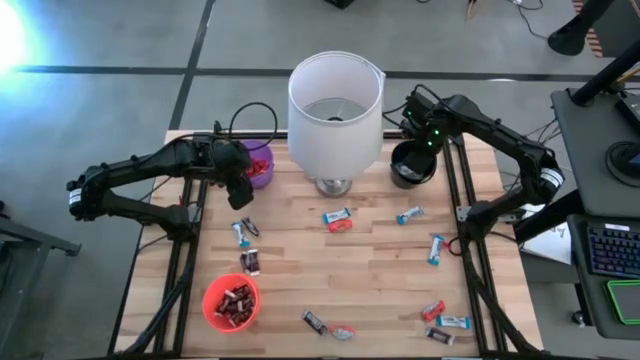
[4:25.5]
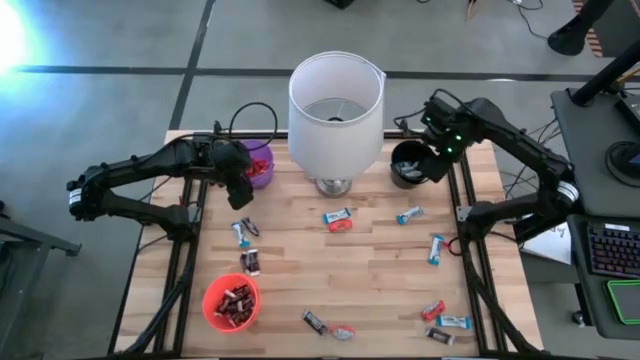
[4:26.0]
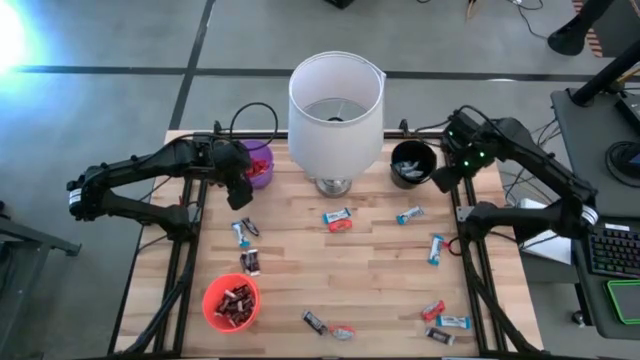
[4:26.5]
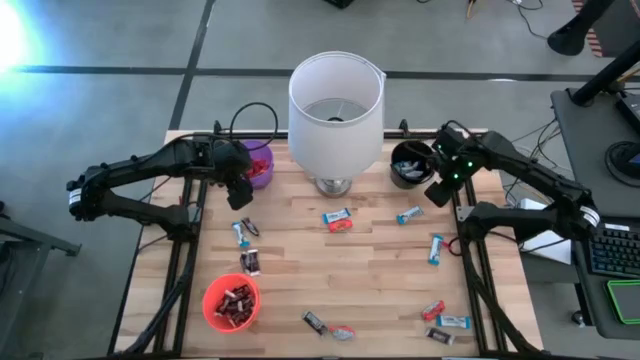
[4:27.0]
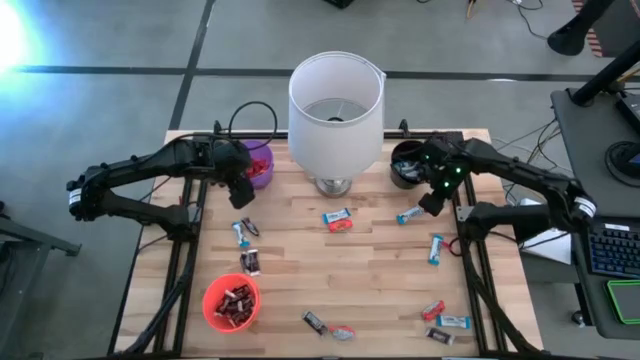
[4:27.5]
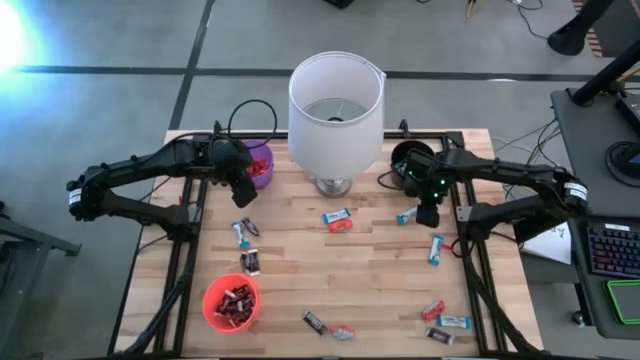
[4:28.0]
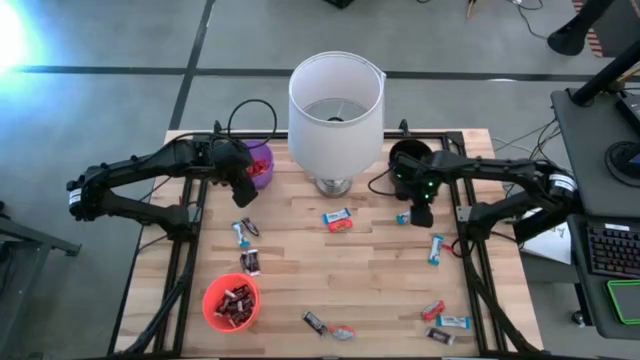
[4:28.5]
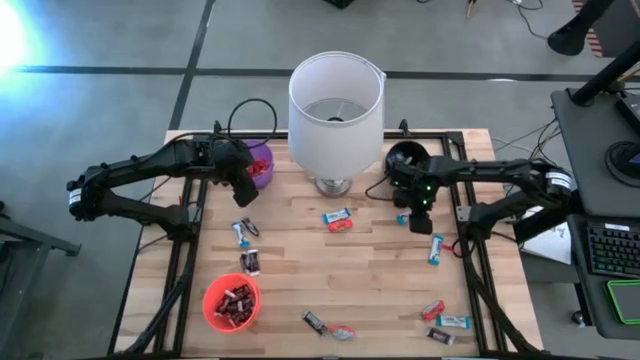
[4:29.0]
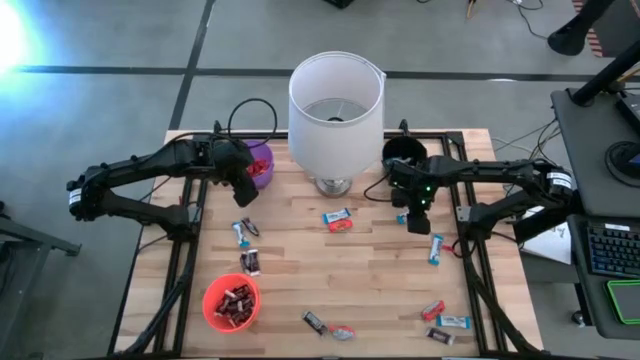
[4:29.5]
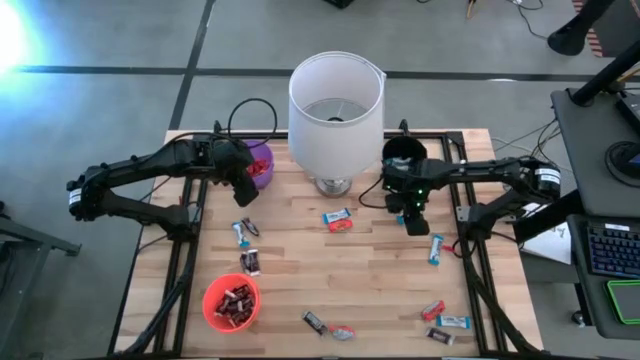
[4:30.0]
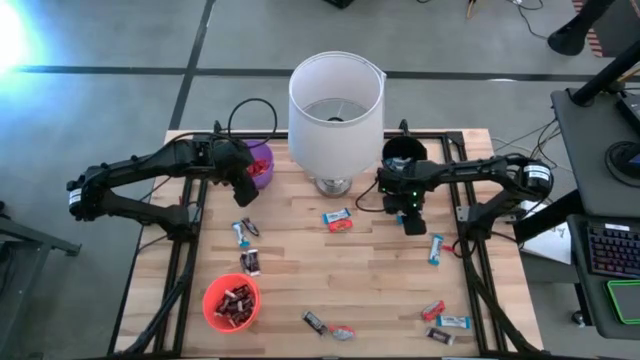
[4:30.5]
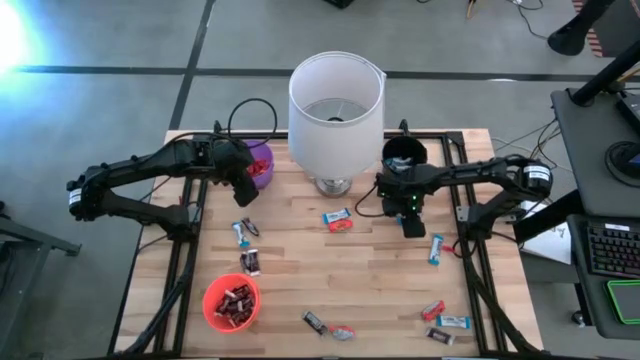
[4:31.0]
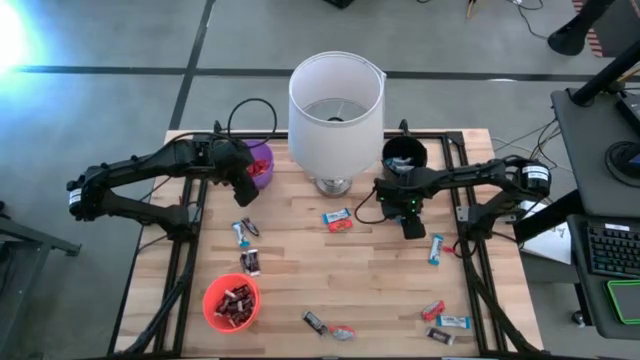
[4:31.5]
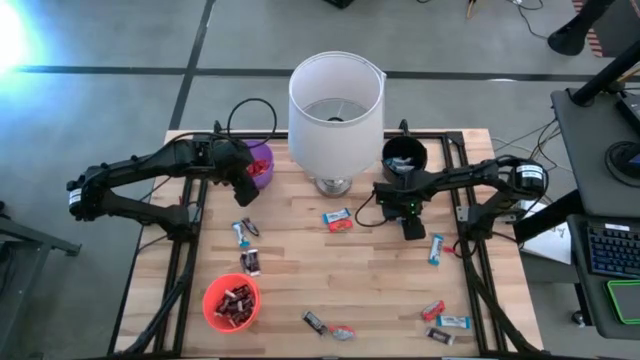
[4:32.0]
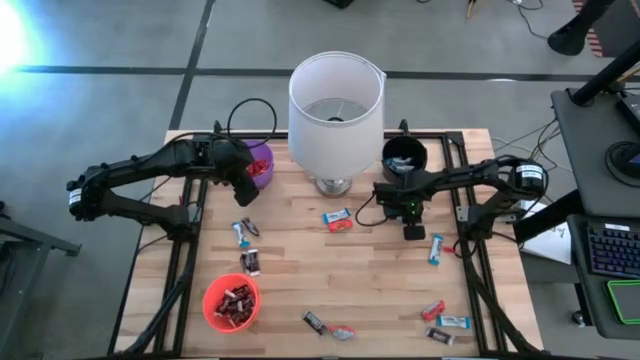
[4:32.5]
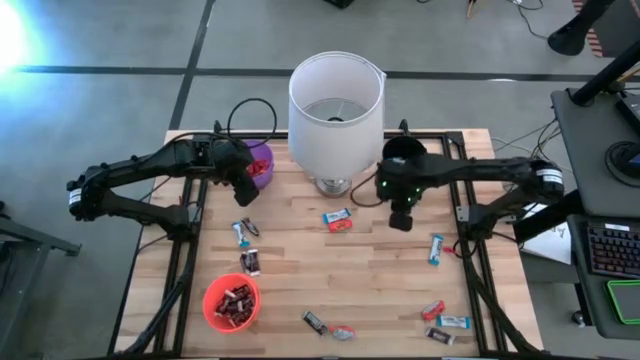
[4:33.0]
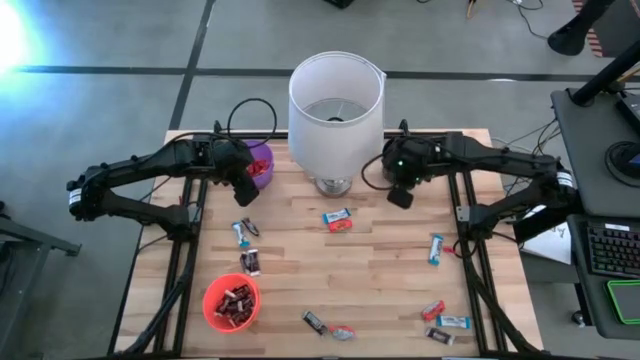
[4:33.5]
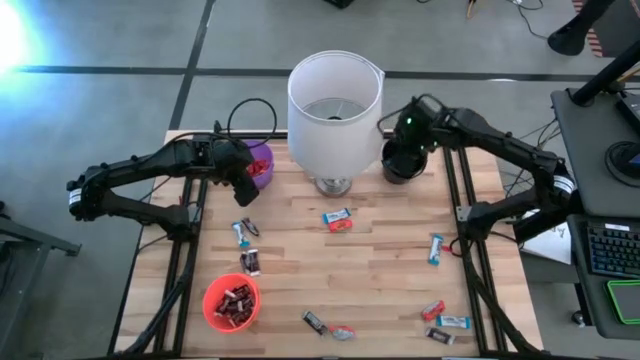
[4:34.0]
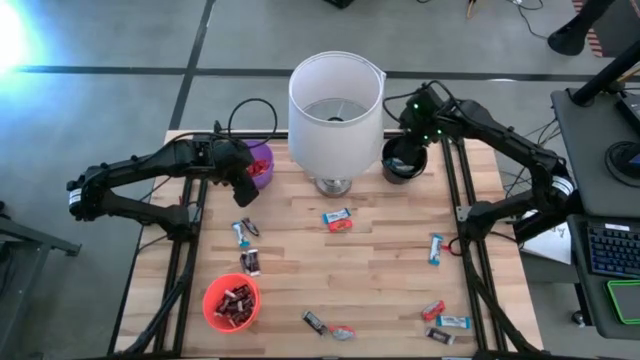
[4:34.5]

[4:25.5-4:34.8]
Task: Sort candy
Put the white chocolate into the black bin

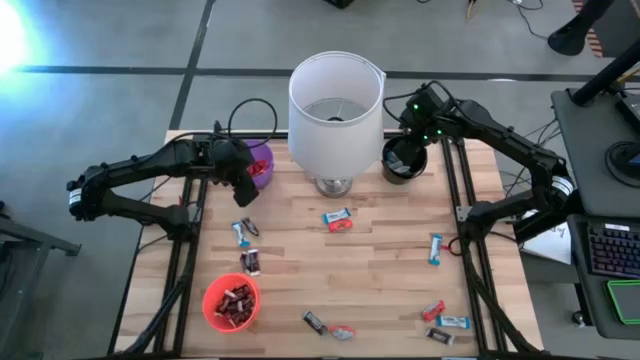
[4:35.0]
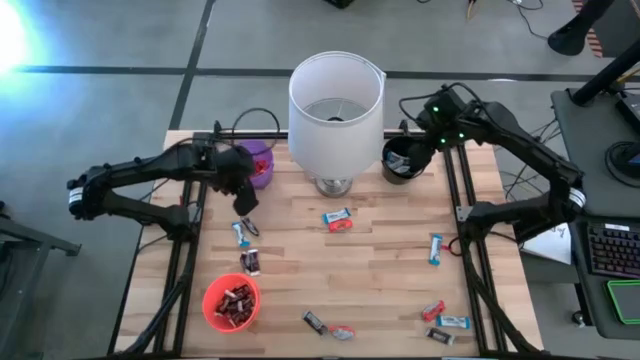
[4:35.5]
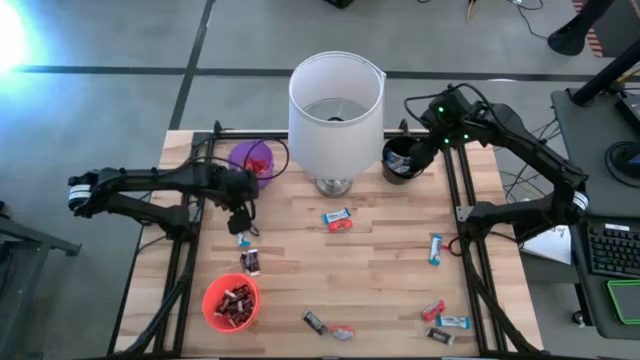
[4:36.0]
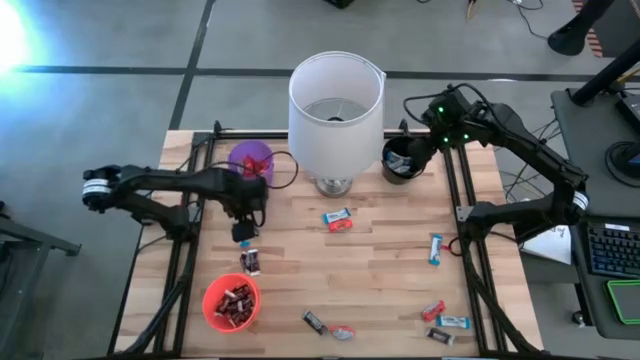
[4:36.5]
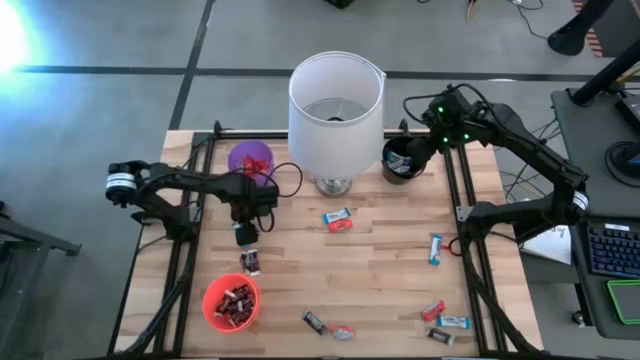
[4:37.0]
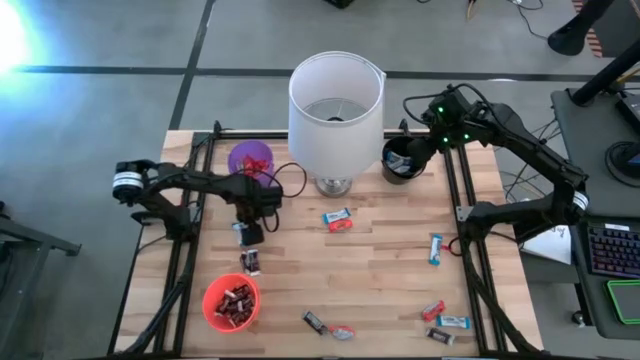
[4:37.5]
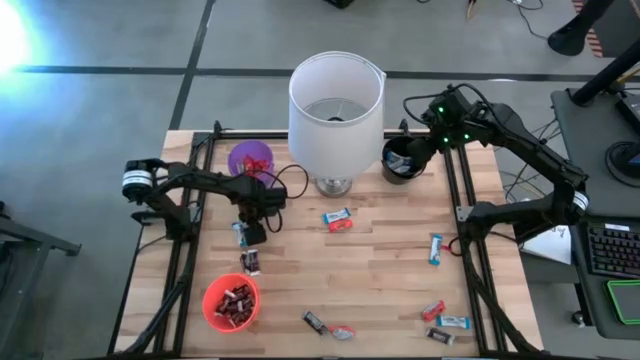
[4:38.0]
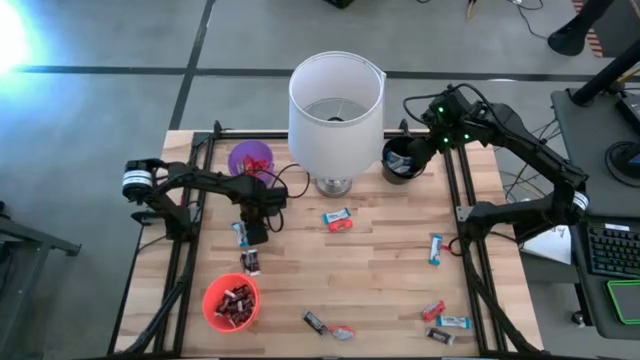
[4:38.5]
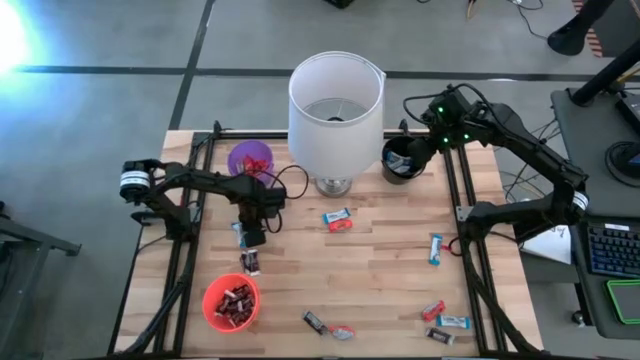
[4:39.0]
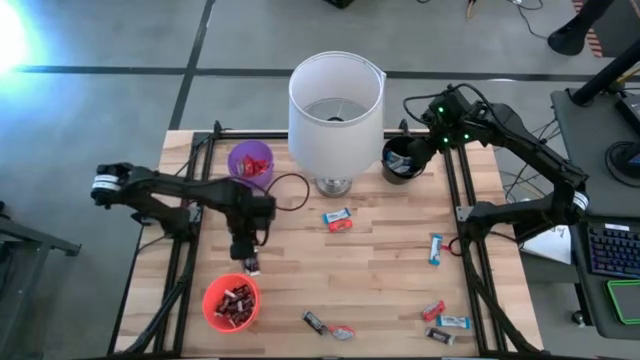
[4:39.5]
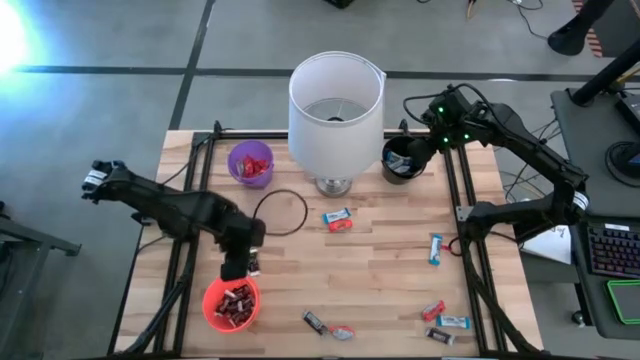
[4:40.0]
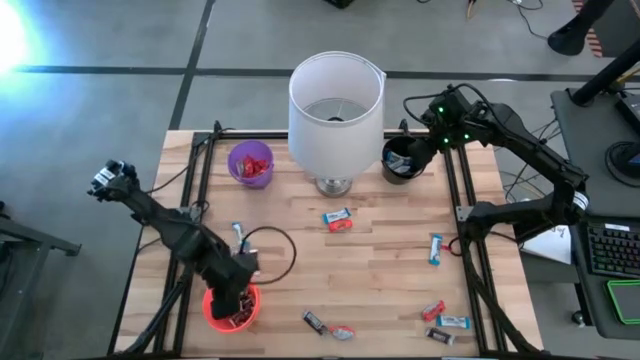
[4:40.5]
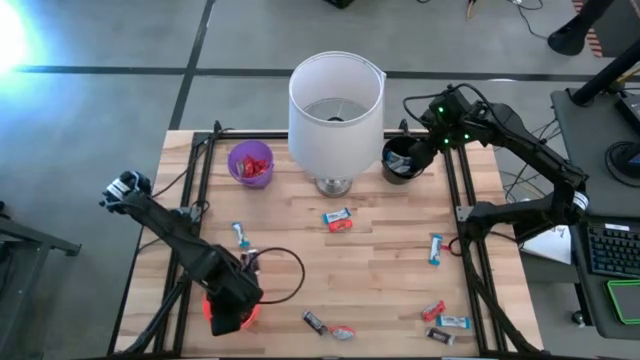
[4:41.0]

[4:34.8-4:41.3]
Put the black chocolate into the orange bucket

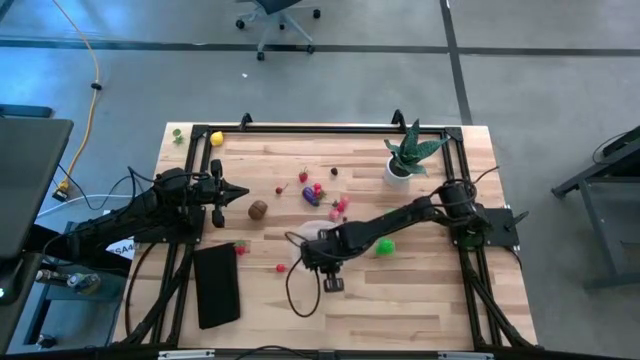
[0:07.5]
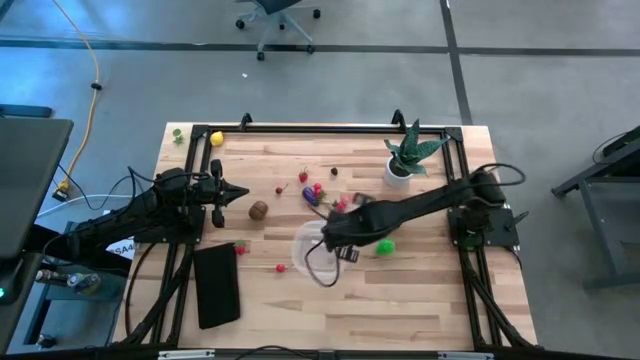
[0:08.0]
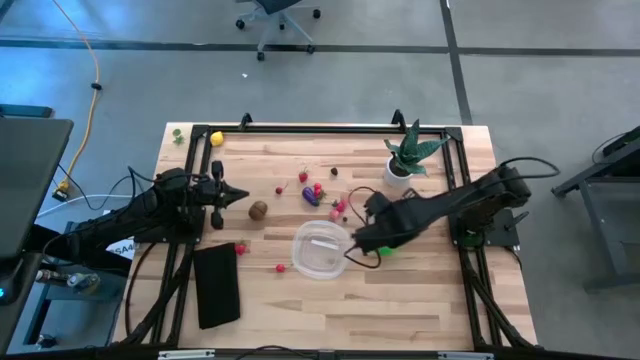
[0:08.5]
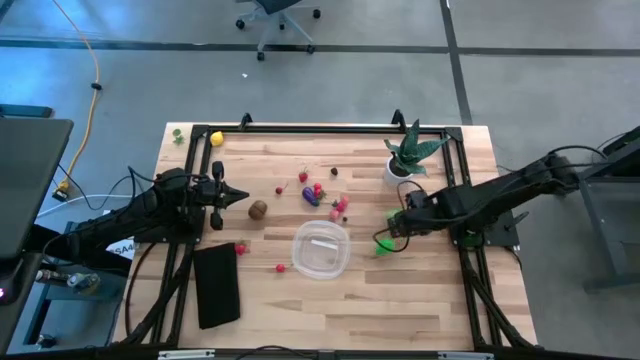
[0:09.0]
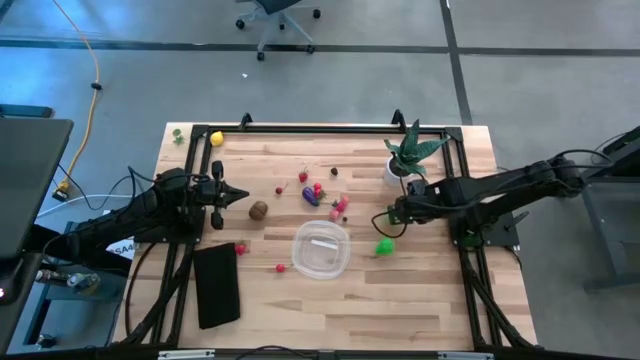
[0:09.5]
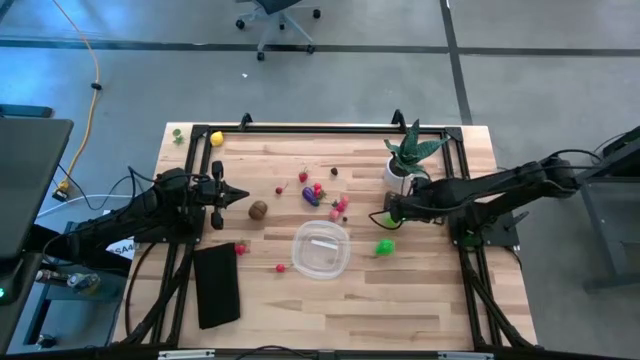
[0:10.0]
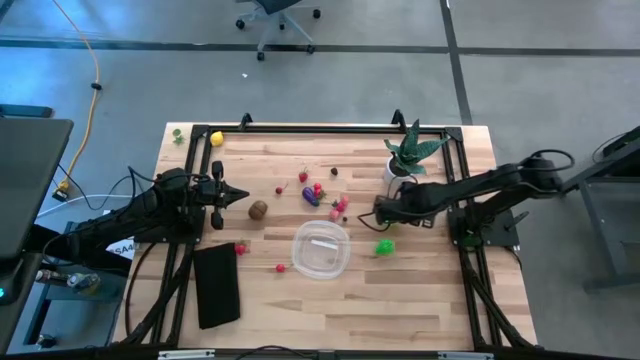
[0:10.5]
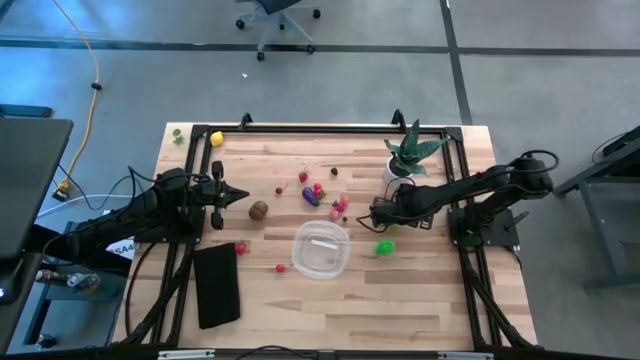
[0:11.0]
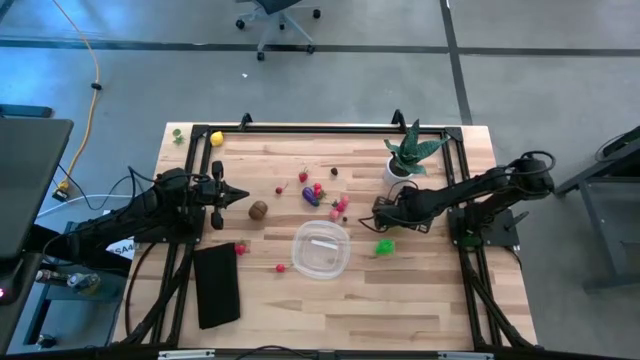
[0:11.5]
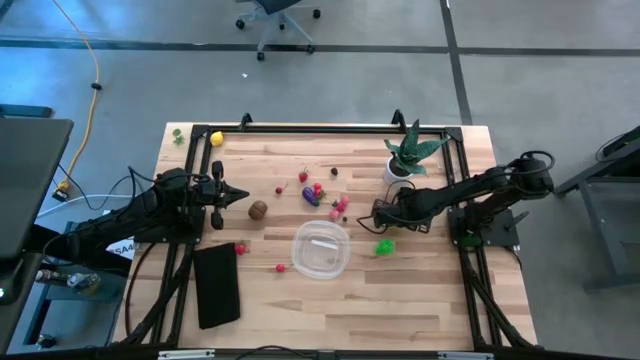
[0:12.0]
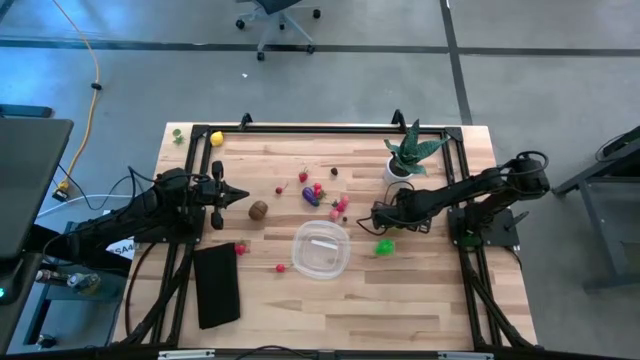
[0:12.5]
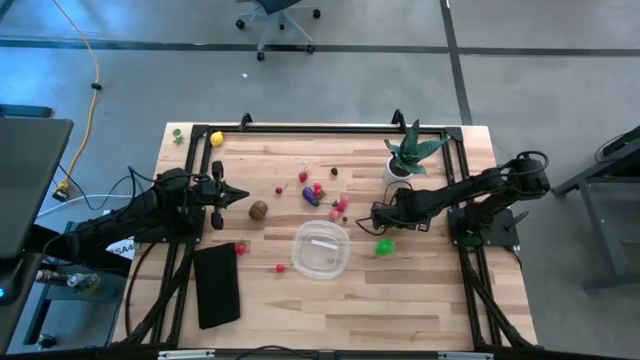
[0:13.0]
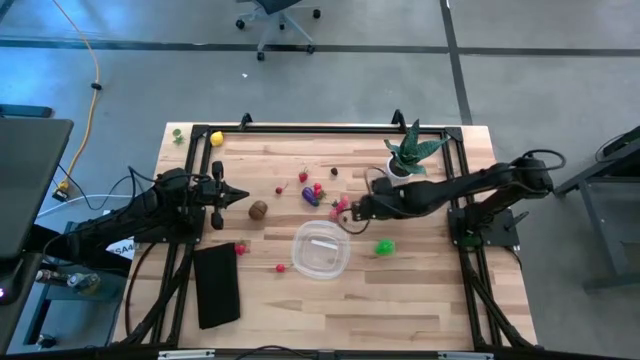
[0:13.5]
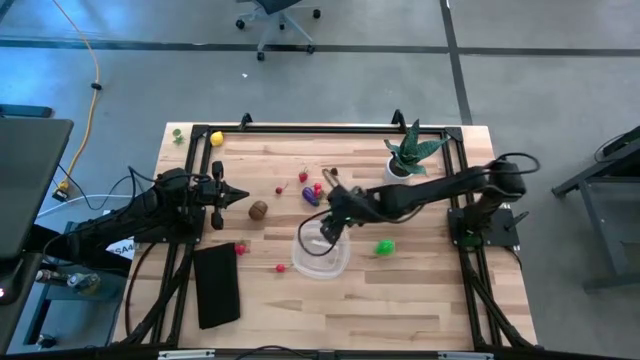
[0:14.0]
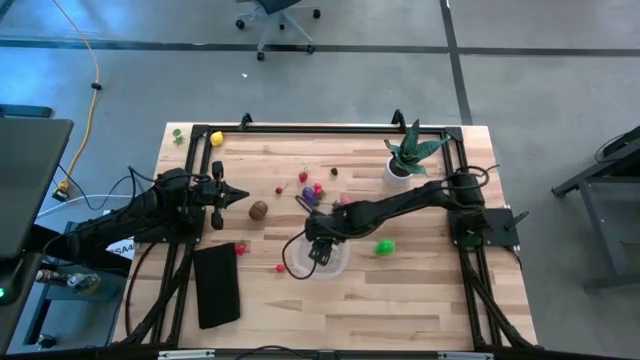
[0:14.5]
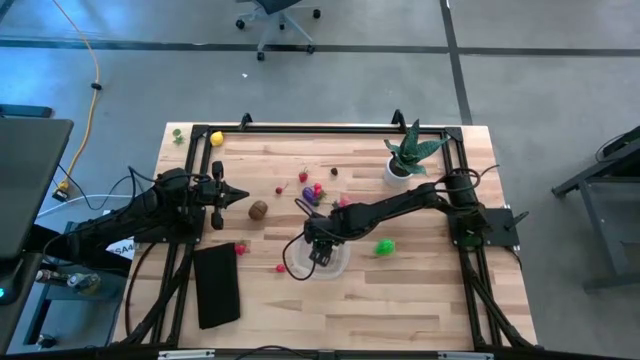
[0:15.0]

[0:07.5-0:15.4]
Task: Pick and placing Produce into tupperware
Put the green cabbage into the transparent container
